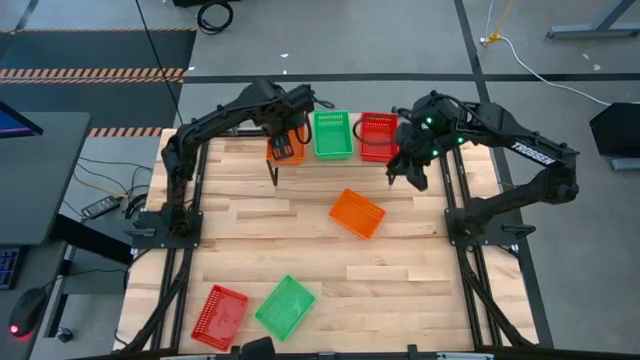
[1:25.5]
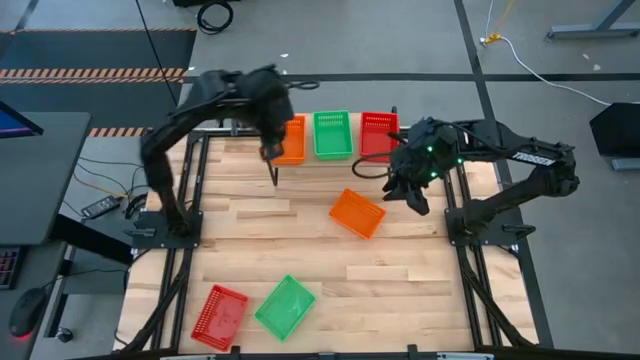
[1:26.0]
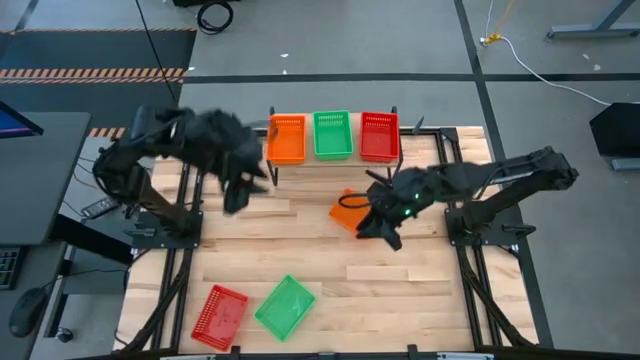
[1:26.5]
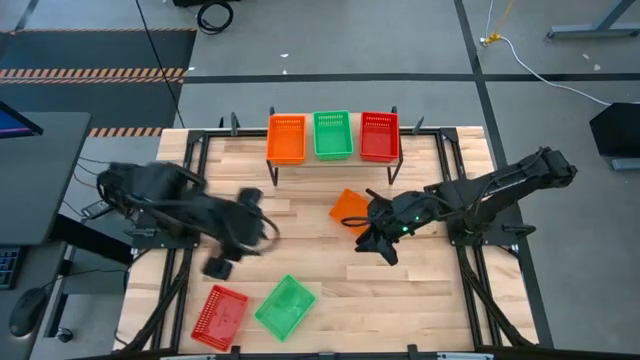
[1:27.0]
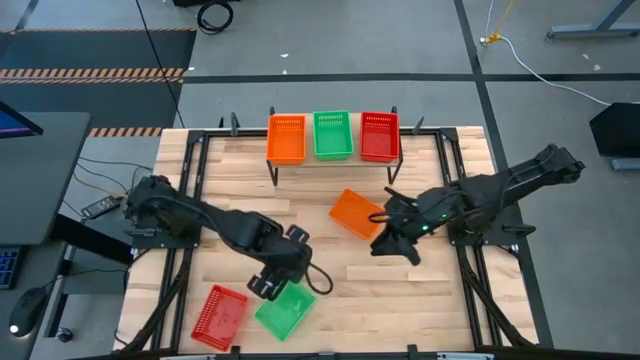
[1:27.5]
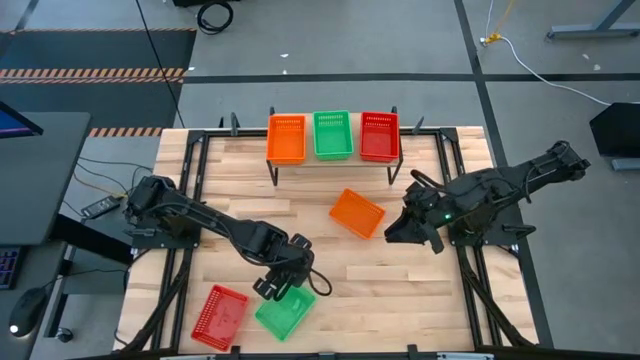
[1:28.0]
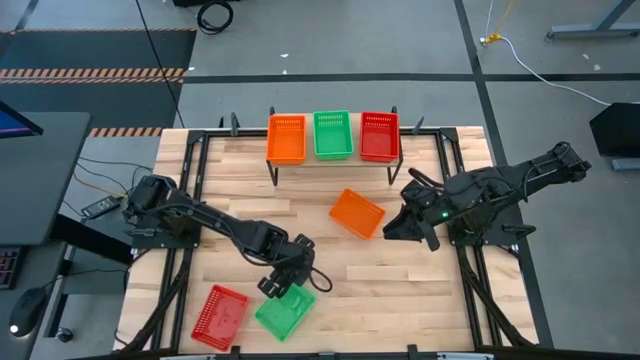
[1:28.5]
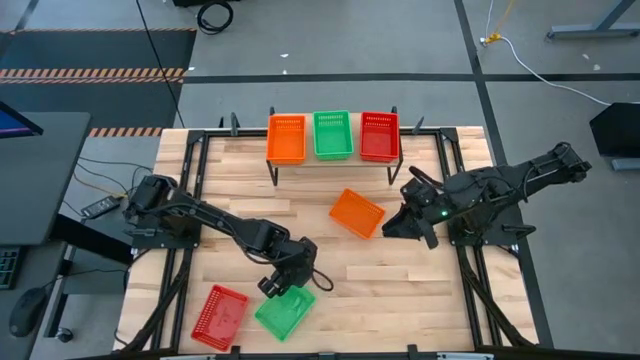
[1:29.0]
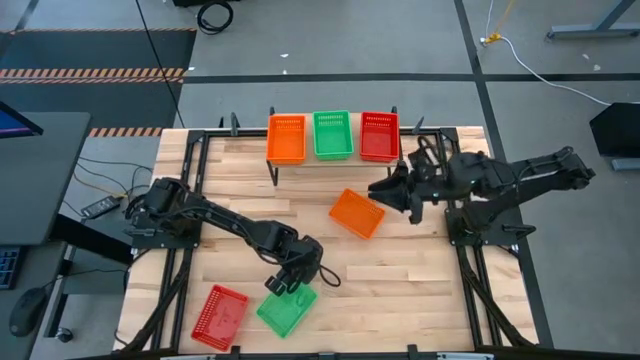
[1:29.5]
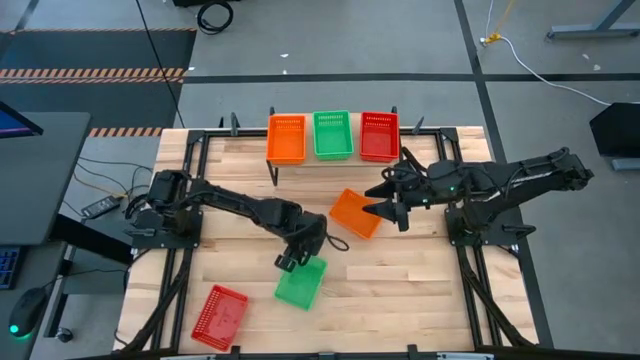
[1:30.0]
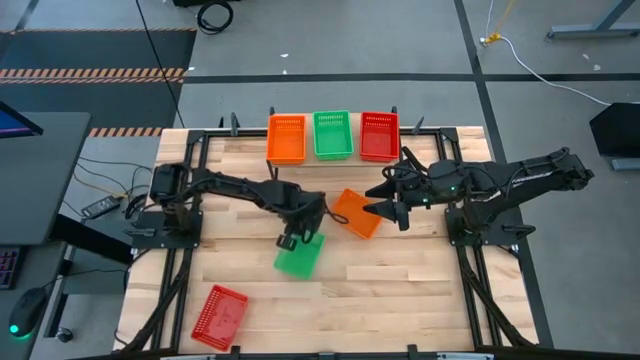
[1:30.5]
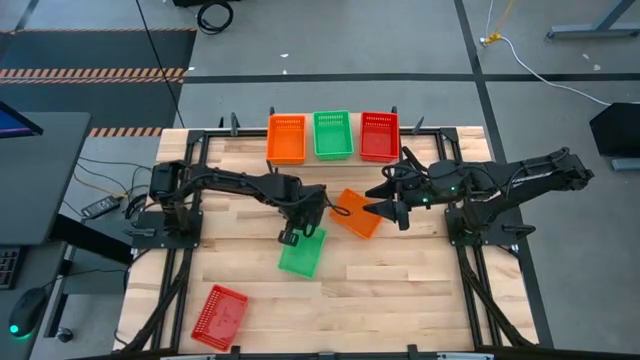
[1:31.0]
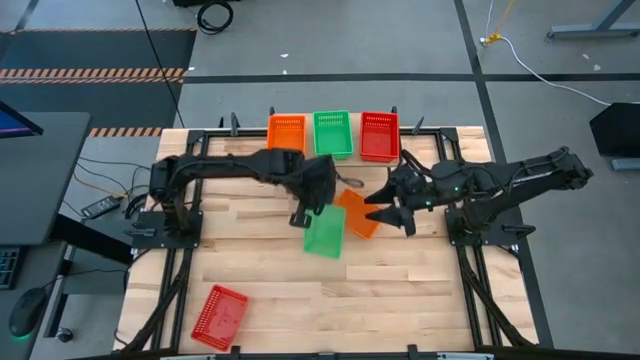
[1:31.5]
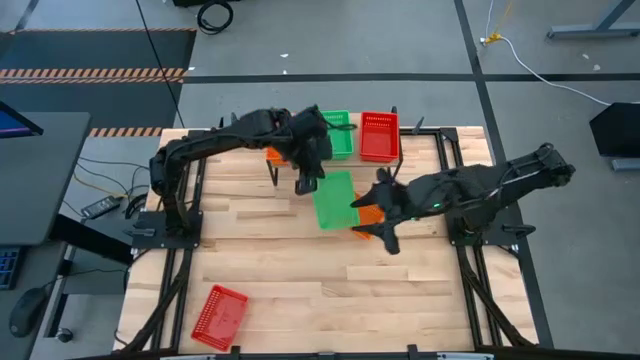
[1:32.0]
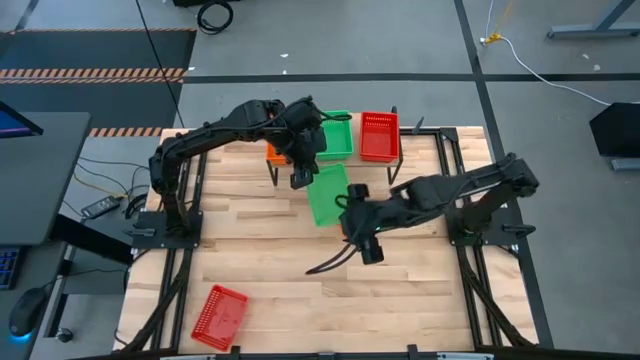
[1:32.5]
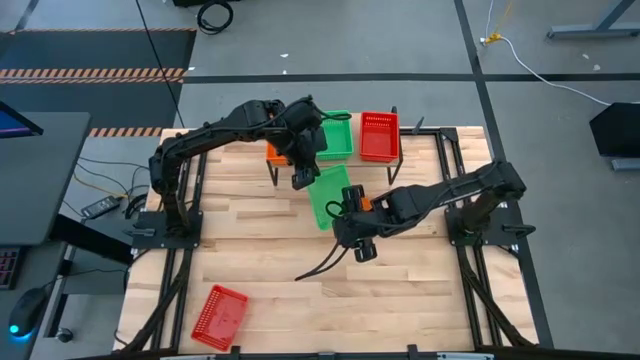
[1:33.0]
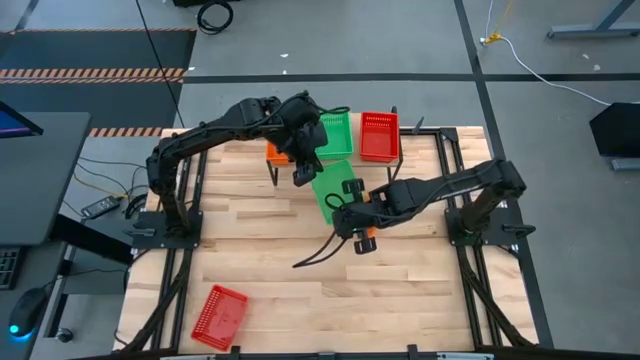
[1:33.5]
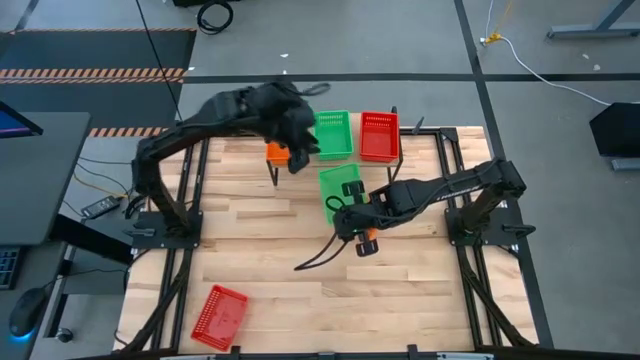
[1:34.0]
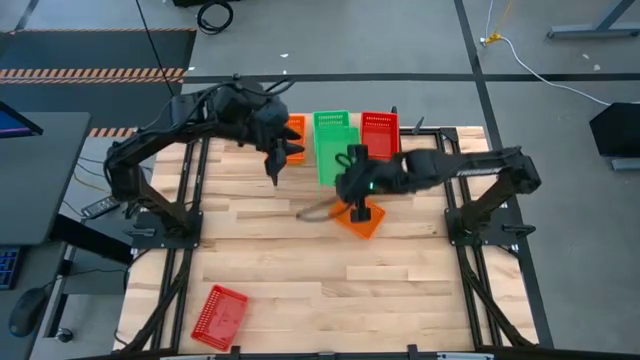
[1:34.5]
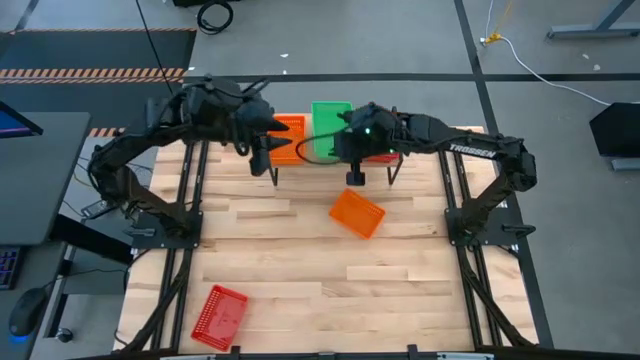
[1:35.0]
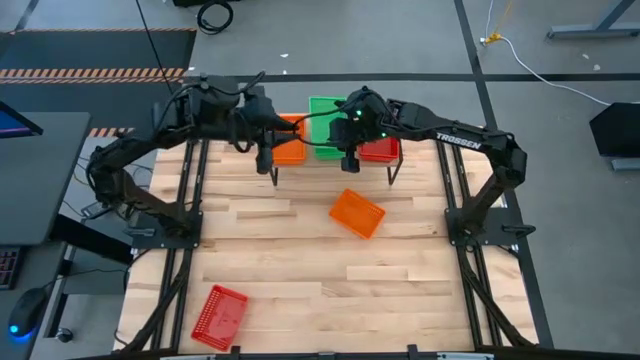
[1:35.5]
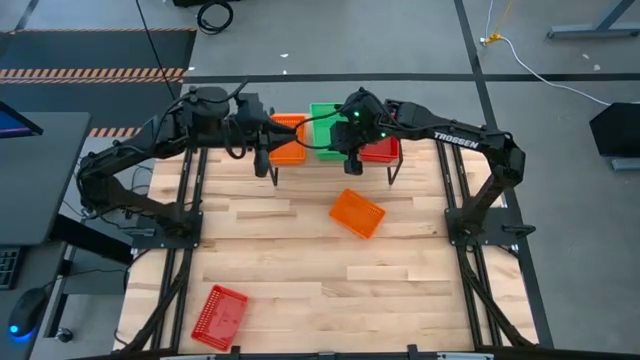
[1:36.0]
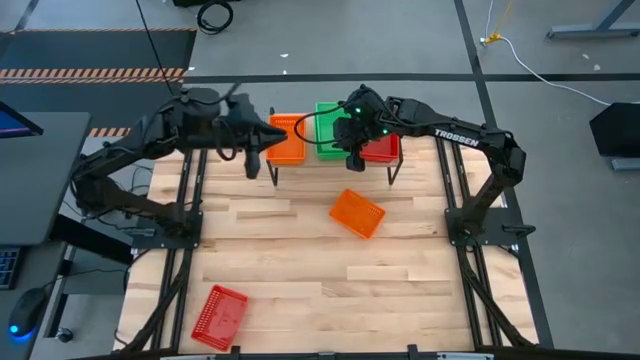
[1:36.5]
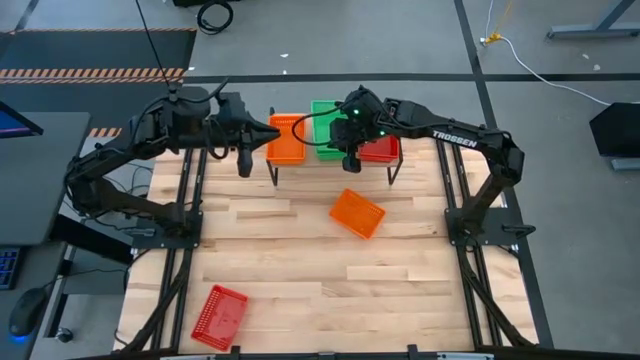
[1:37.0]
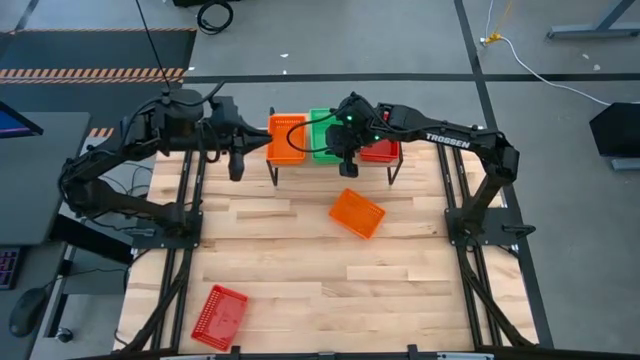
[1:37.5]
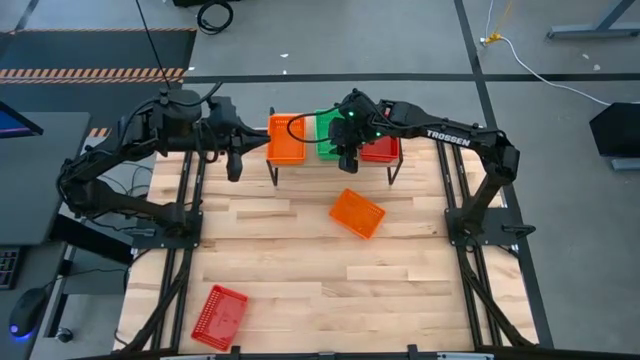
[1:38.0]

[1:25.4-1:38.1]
Task: Stack baskets on shelf by color
Stack the green bin on the green bins on the shelf

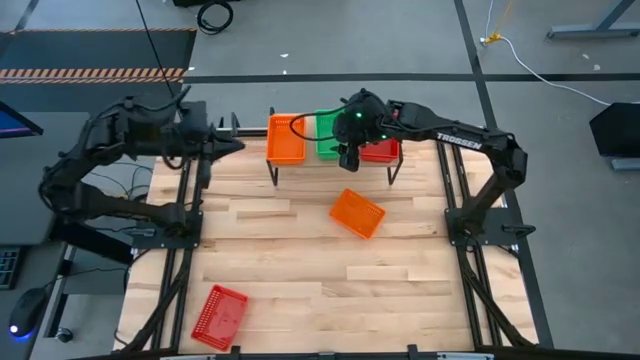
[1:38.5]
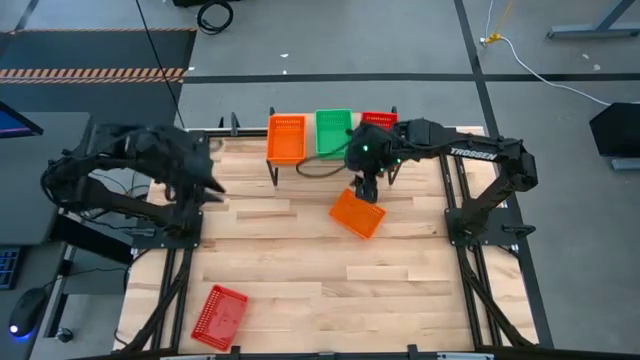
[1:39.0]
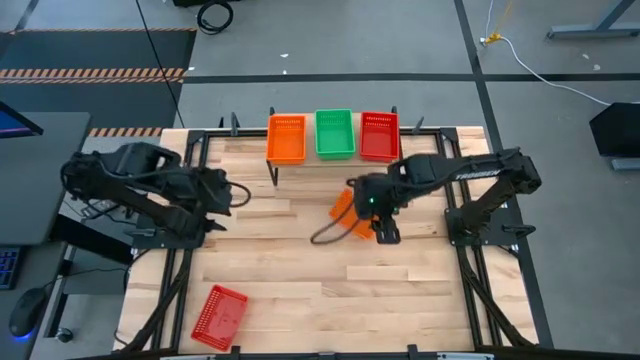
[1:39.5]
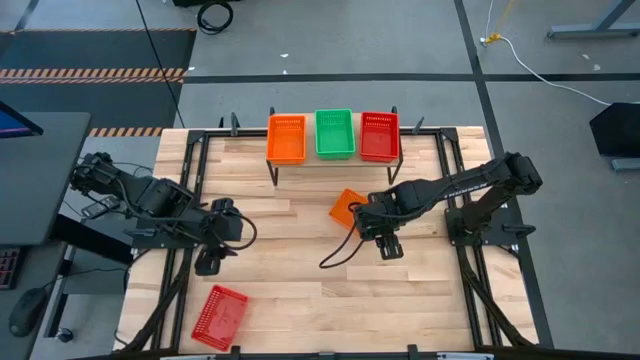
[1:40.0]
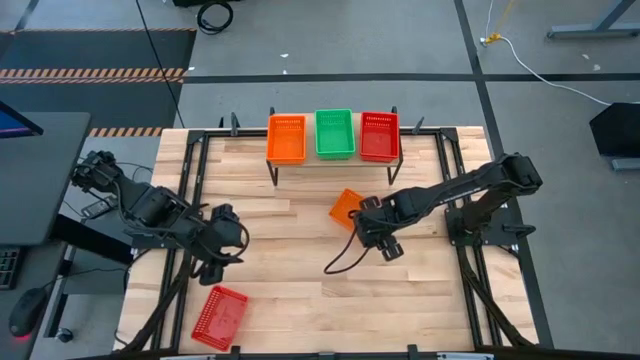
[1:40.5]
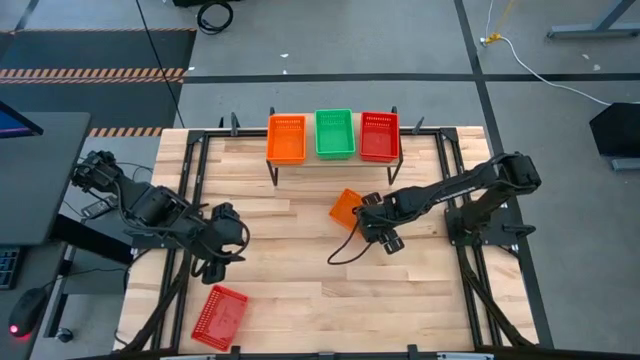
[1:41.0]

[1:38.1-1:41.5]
Stack the orange bin on the orange bins on the shelf

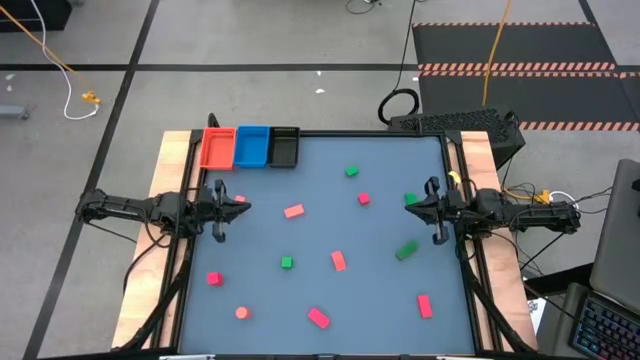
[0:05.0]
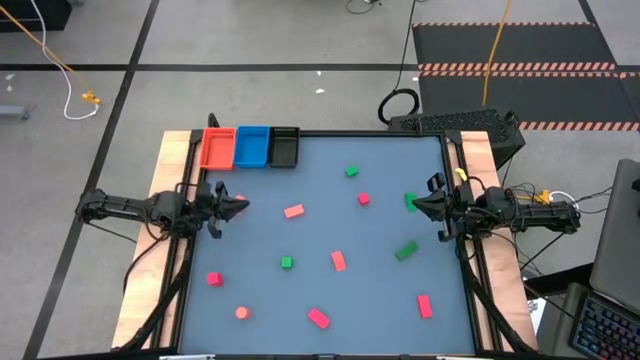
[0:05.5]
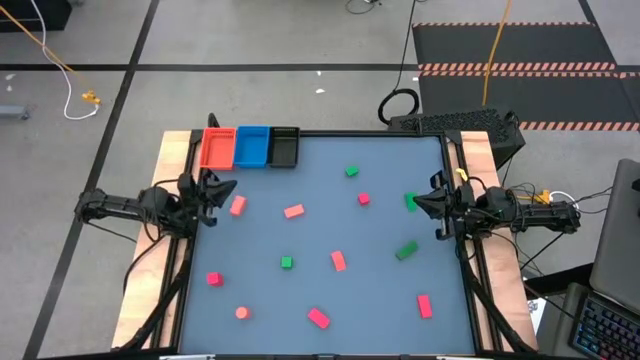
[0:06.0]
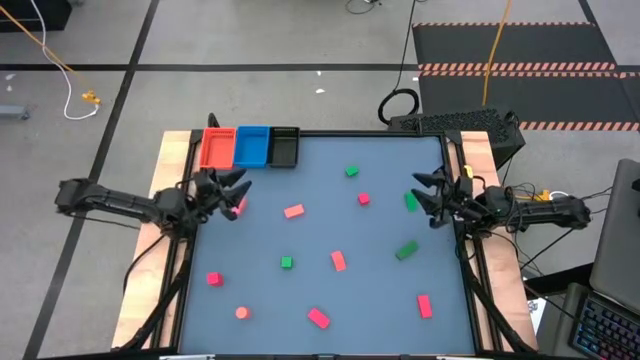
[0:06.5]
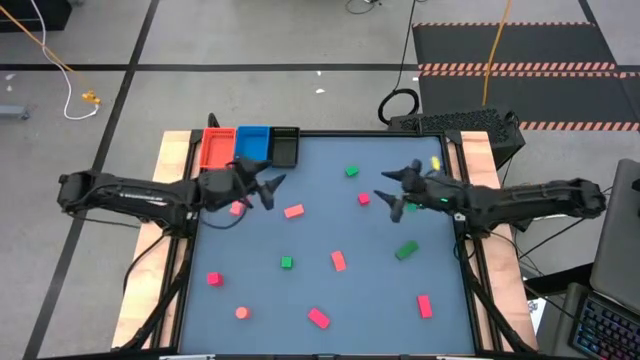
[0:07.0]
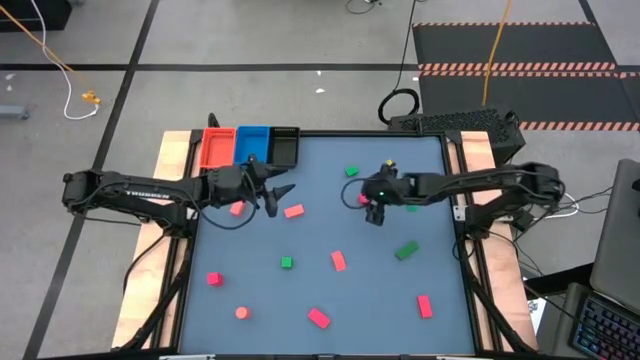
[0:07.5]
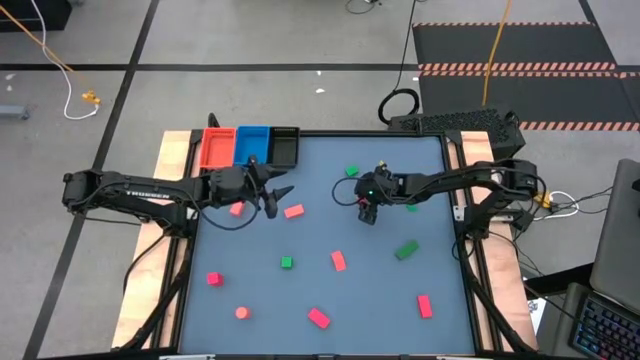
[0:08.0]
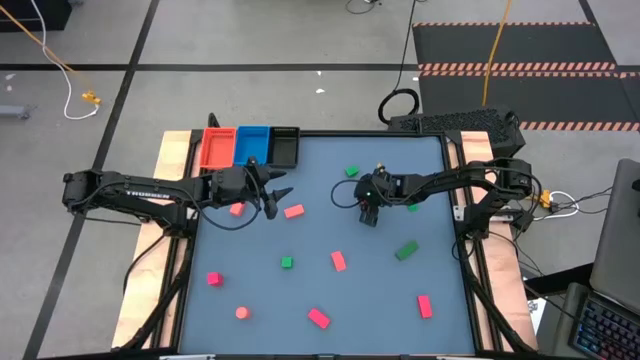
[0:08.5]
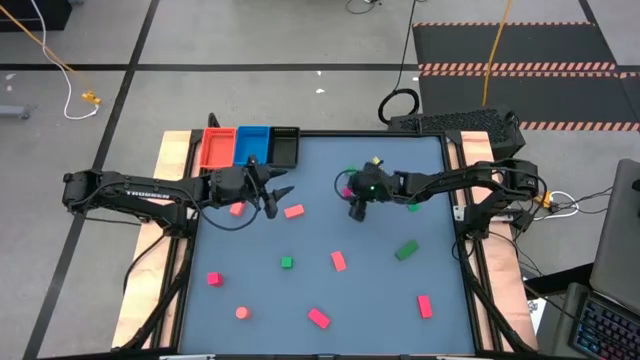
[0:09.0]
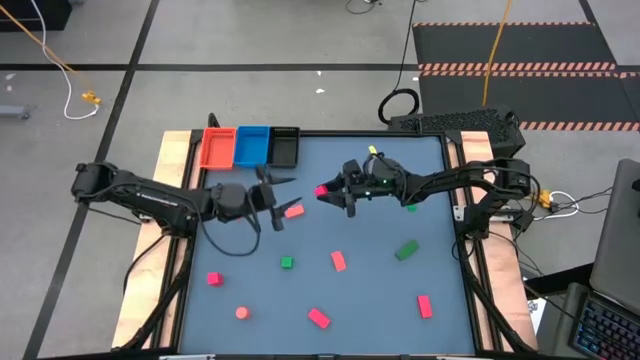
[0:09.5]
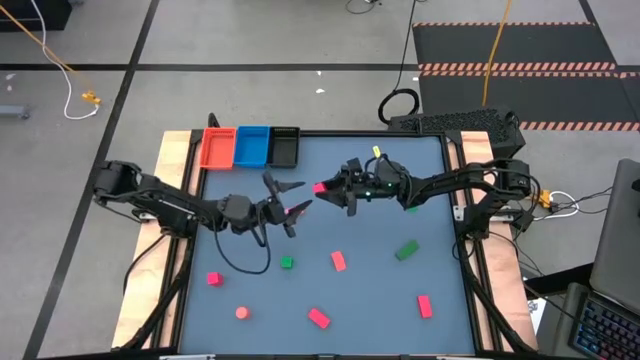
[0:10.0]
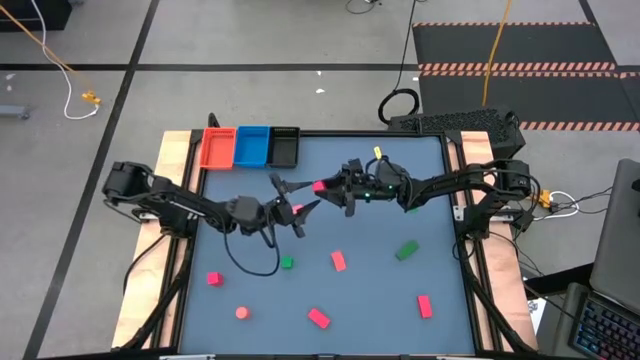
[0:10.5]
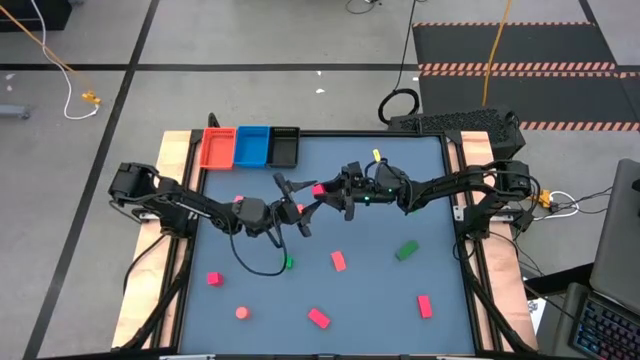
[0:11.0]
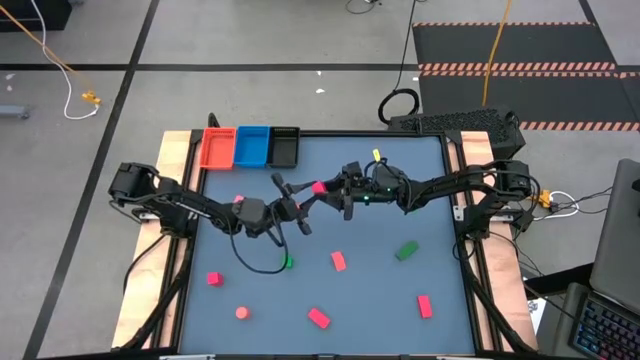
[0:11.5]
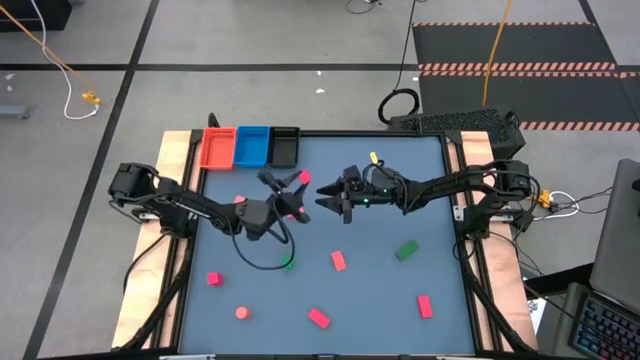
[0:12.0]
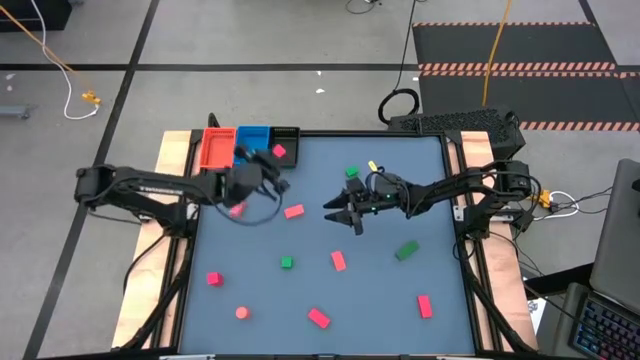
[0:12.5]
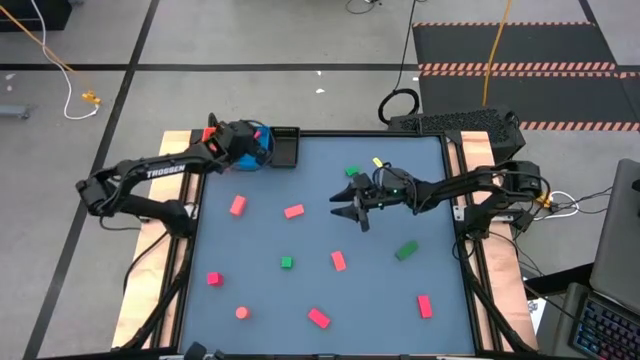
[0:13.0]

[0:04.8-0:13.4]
Task: Sort & place blocks by color
Put the red block into the blue bin
